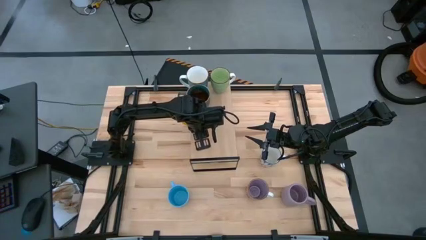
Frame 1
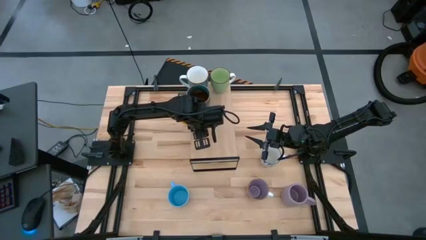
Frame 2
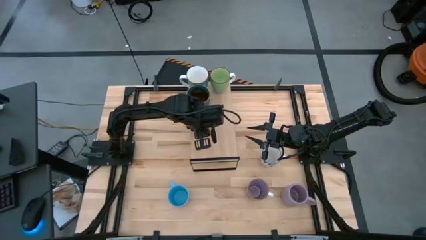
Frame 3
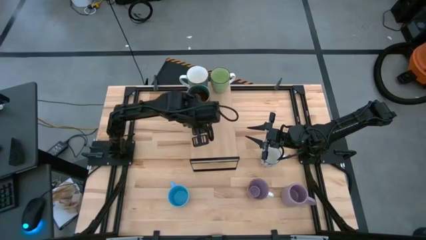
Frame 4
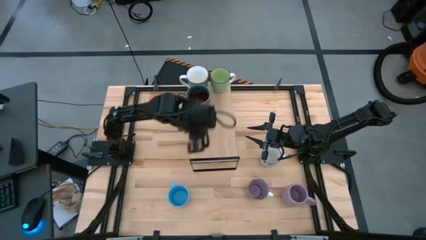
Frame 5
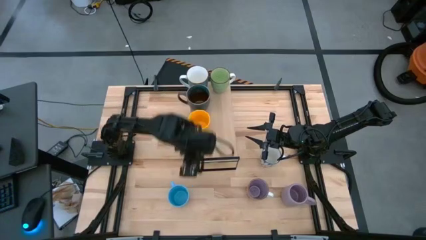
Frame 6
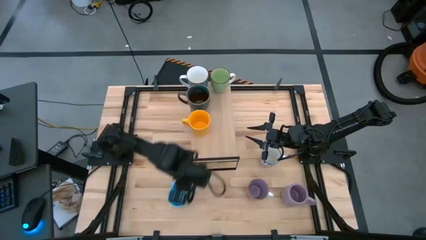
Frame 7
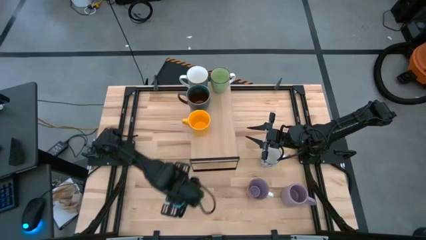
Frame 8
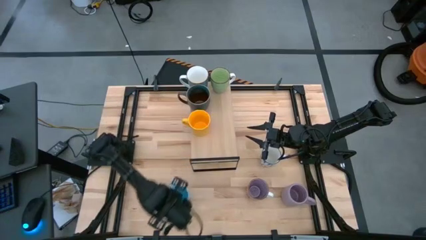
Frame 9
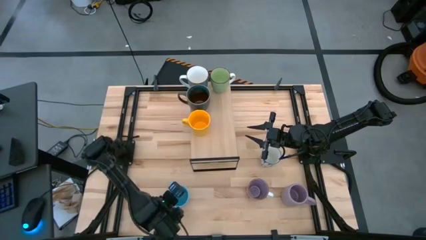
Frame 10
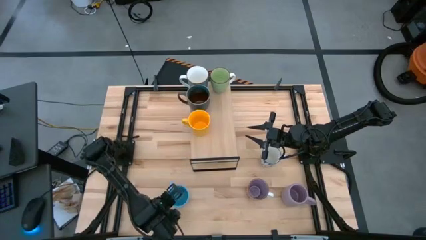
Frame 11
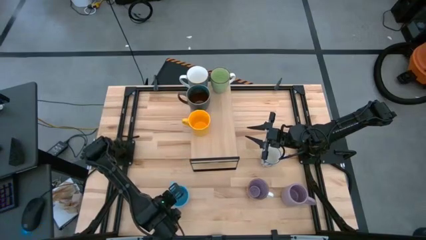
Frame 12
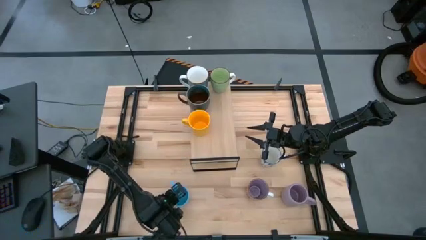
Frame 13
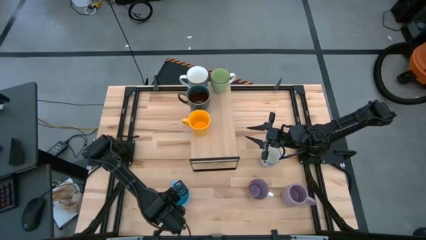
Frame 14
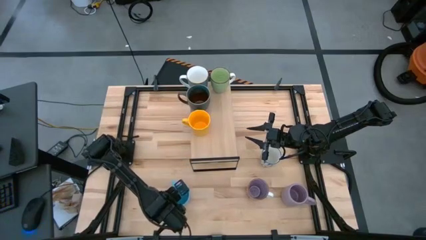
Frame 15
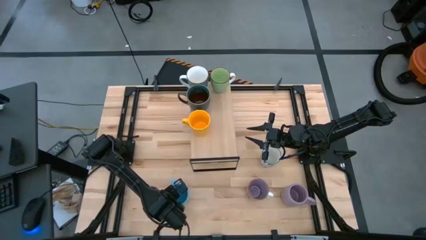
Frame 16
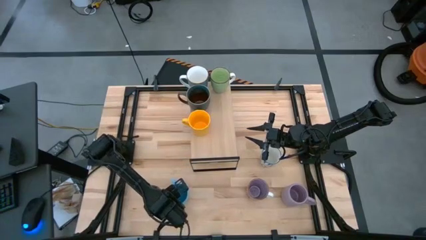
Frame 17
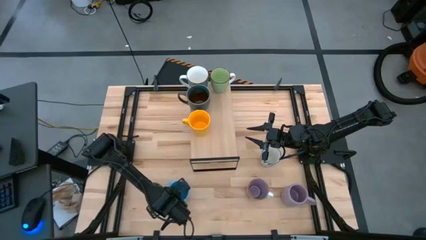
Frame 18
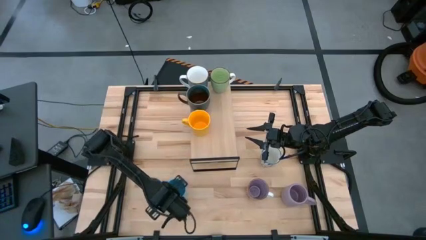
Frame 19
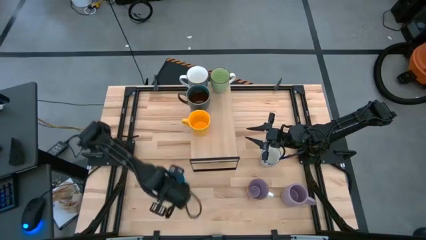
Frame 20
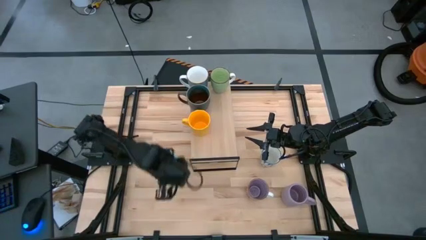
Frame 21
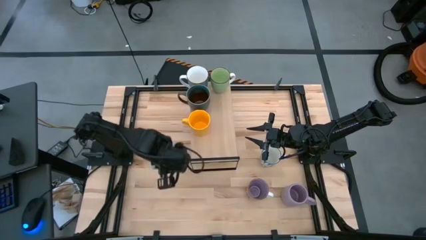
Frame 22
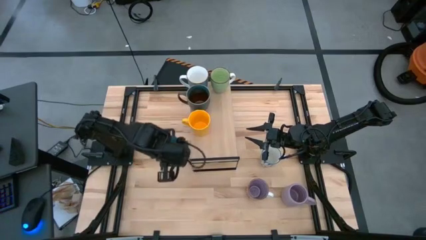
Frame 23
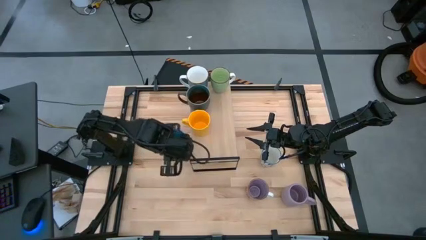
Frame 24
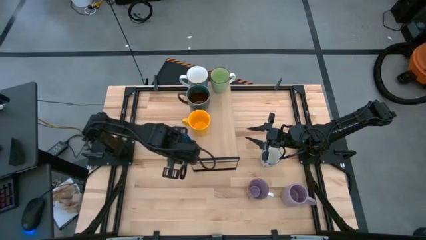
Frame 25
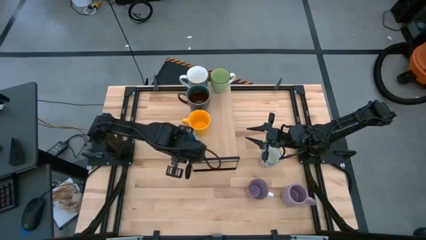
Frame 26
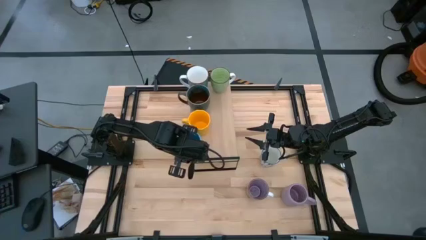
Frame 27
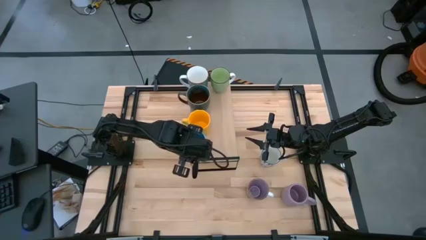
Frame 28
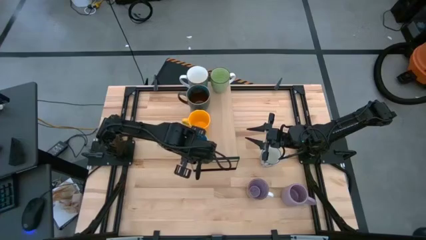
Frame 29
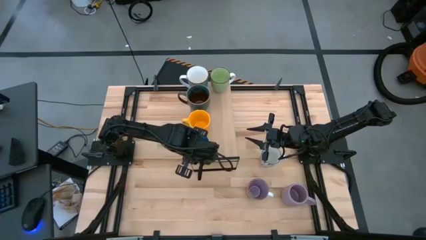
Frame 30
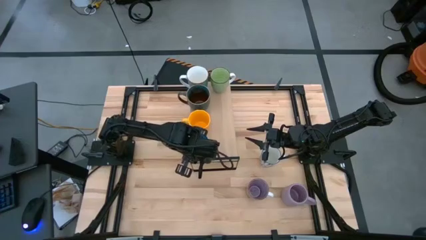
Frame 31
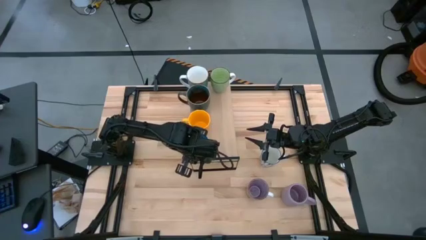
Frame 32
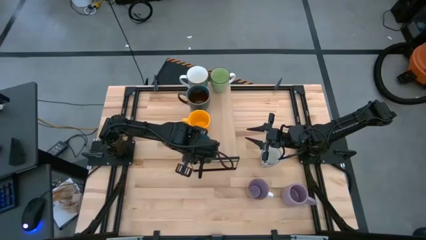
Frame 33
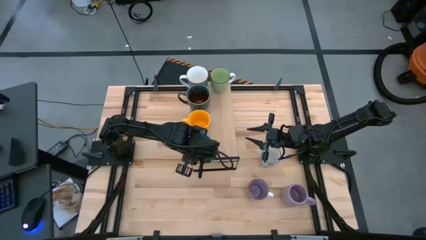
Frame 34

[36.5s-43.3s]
Task: Place coffee mugs
Put the light blue mug on the shelf

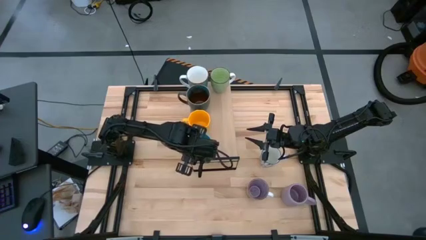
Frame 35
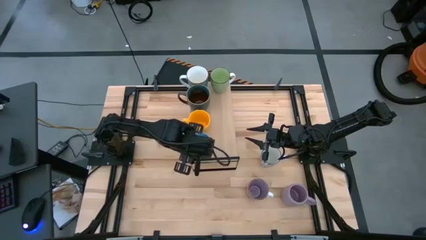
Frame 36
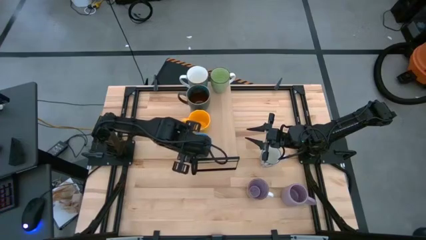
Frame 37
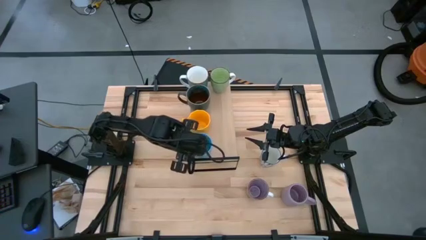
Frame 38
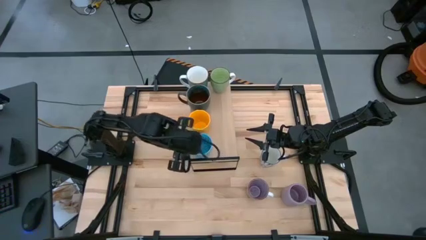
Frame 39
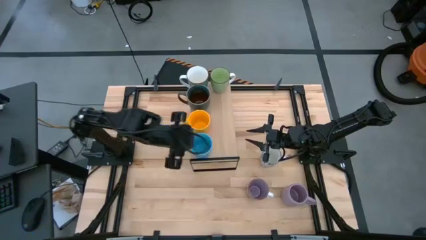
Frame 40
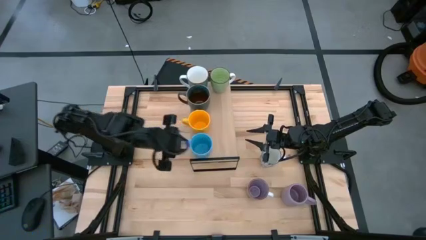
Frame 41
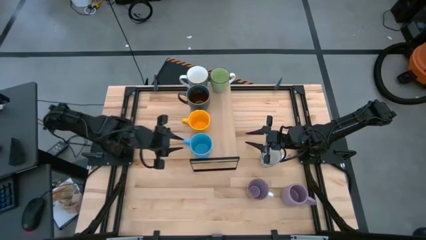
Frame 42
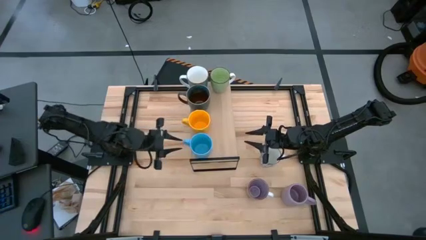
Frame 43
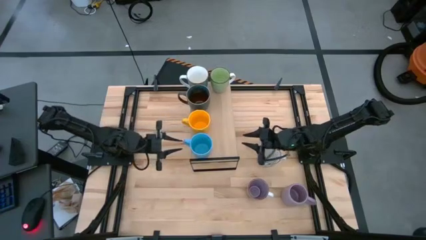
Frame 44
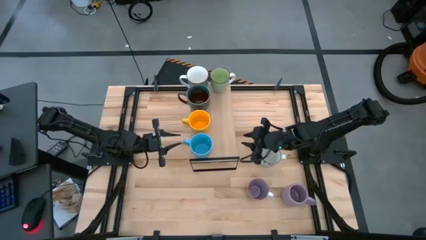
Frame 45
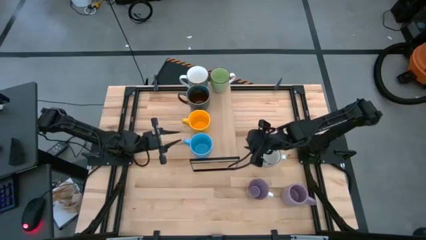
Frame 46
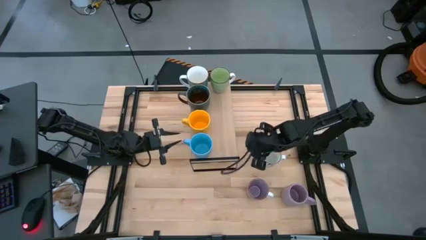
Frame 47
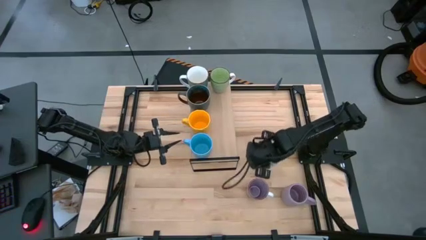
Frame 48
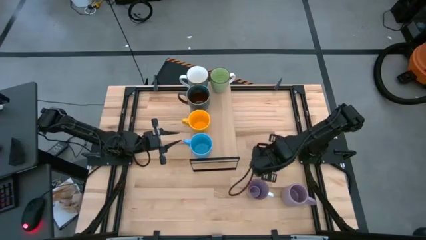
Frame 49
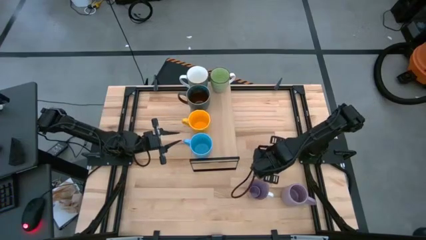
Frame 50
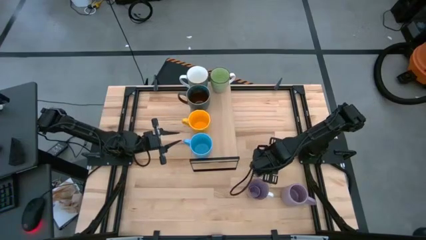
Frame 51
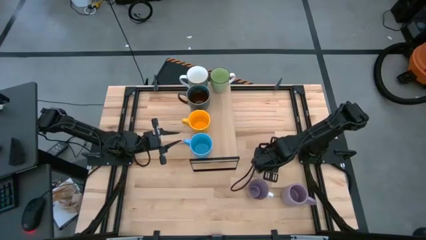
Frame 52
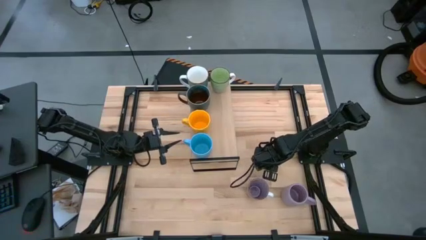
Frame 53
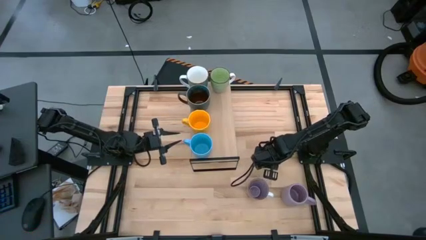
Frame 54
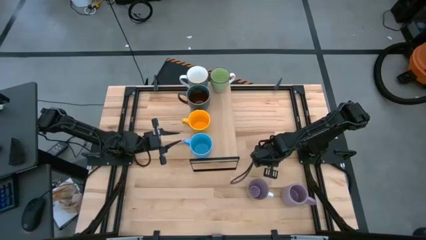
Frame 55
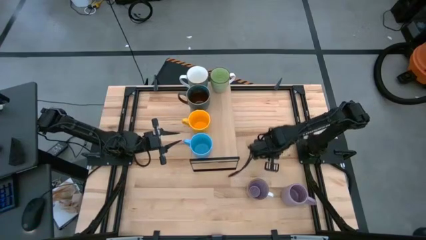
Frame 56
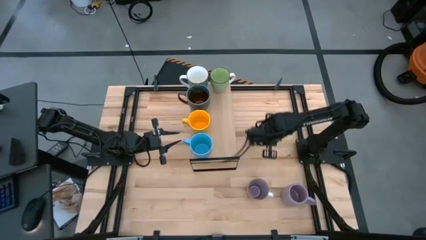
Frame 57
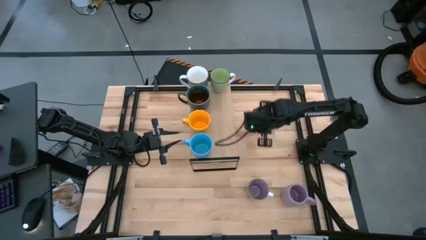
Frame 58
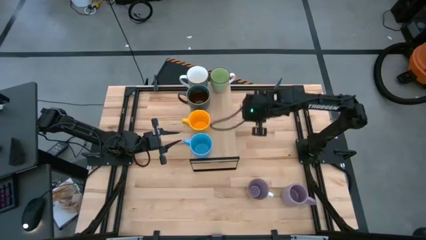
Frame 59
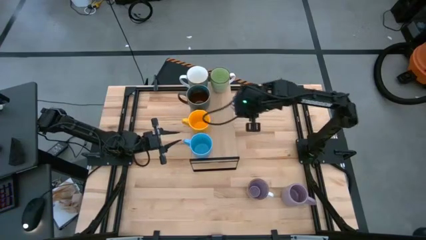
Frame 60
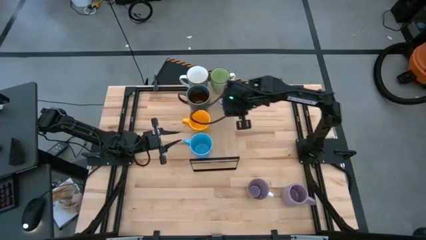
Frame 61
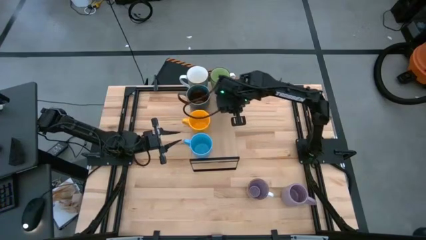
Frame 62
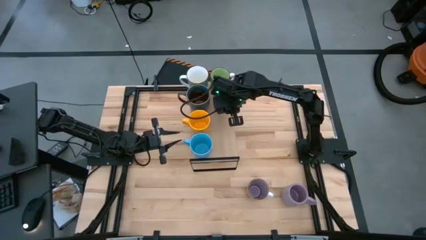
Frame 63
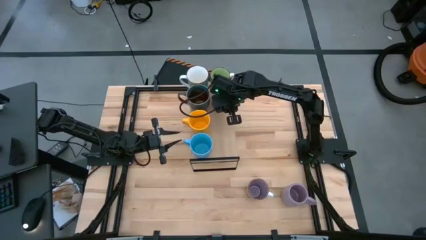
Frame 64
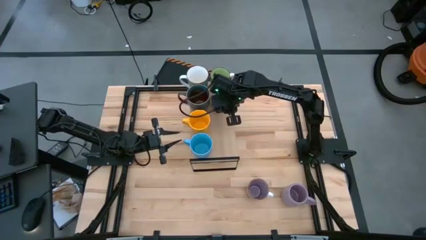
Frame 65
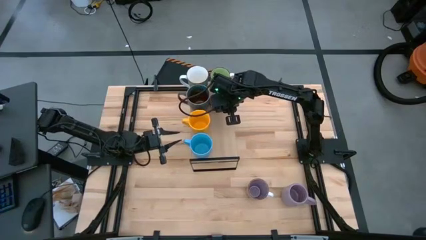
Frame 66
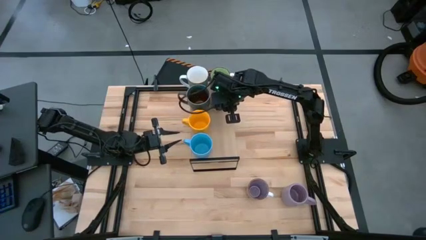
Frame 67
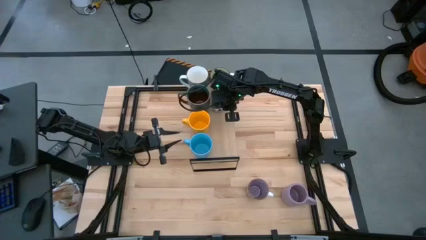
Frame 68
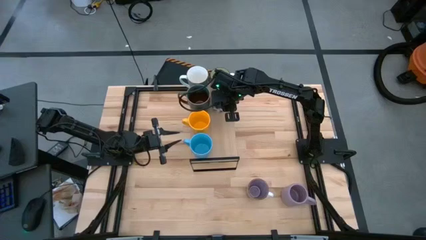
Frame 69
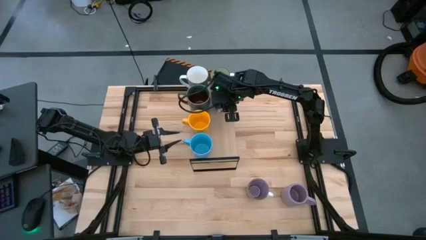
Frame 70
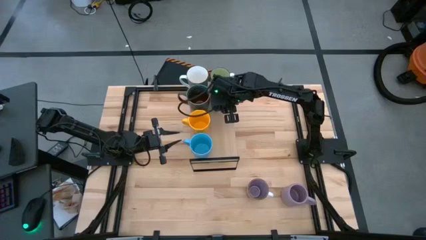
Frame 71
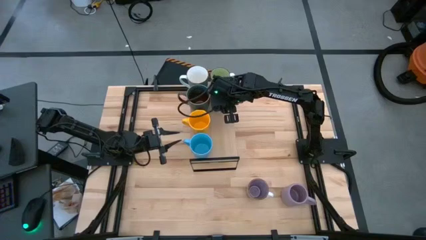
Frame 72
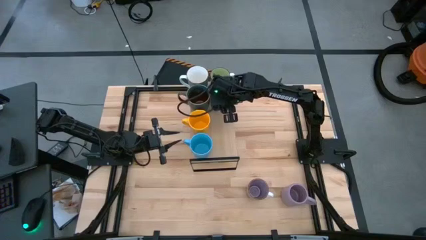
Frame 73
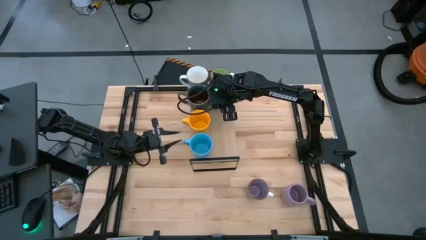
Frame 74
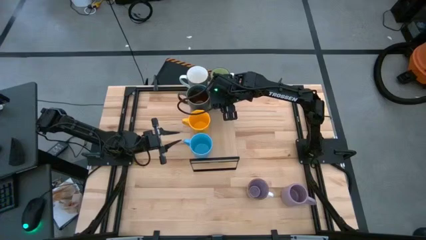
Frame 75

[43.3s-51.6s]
Put the blue and white mug on the shelf aligned with the dark blue mug

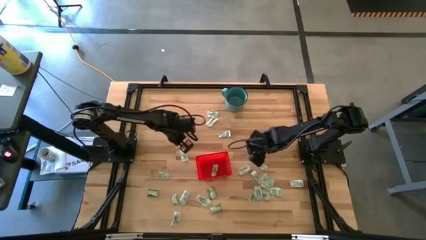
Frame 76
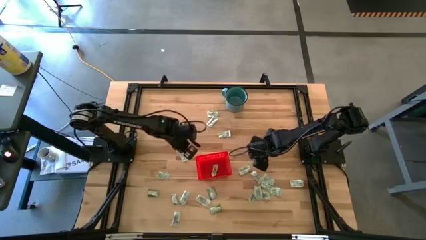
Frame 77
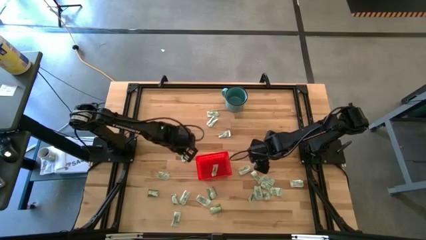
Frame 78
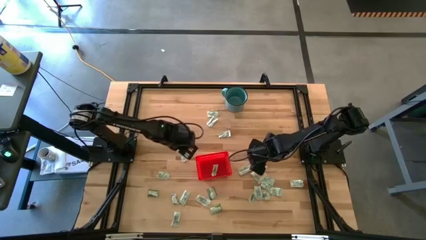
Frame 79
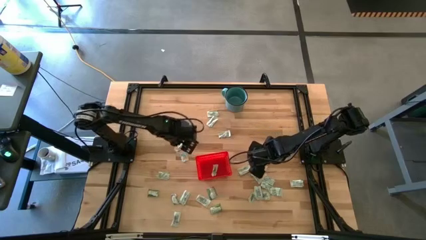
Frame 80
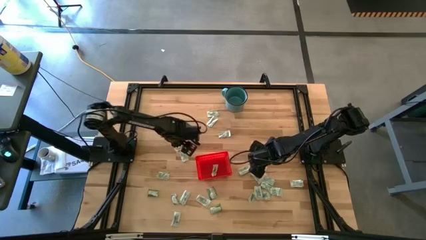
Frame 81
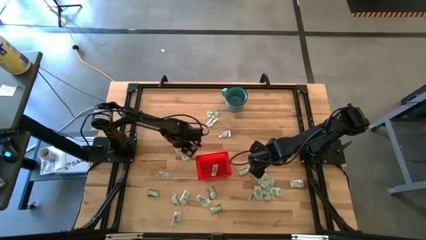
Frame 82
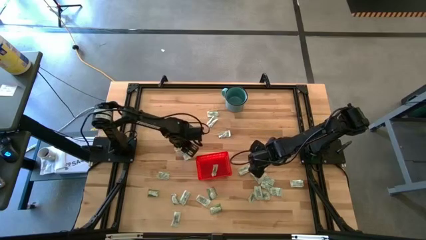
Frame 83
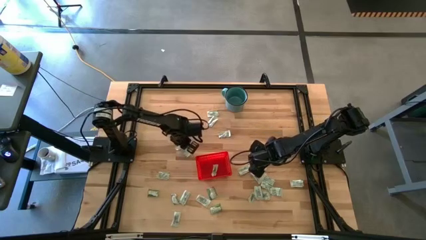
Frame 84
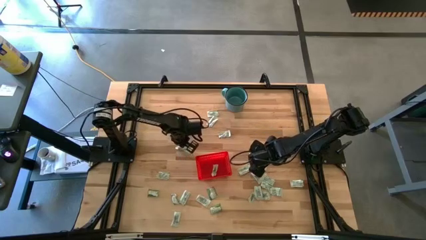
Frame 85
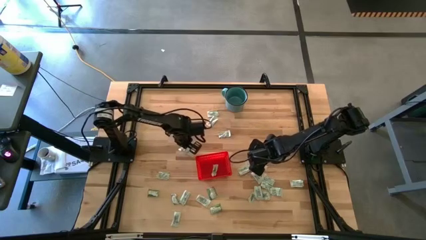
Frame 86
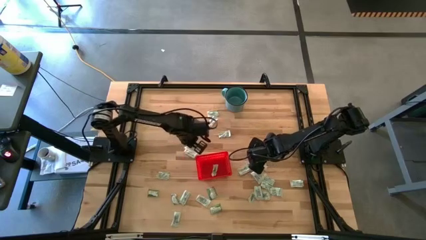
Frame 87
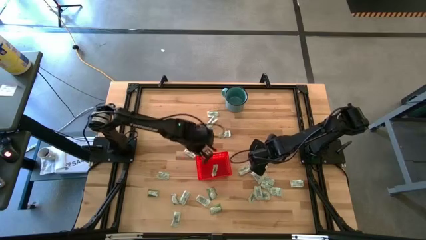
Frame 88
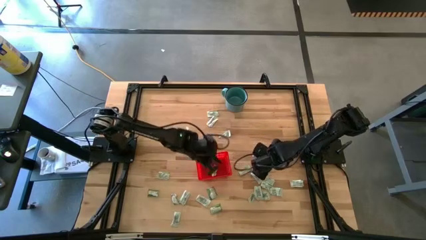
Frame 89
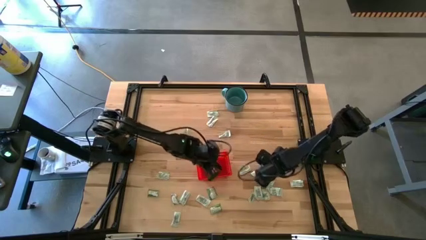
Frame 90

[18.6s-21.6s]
Task: Pick and place Stevia / Truvia into bins
Put the green stevia packet into the red bin
